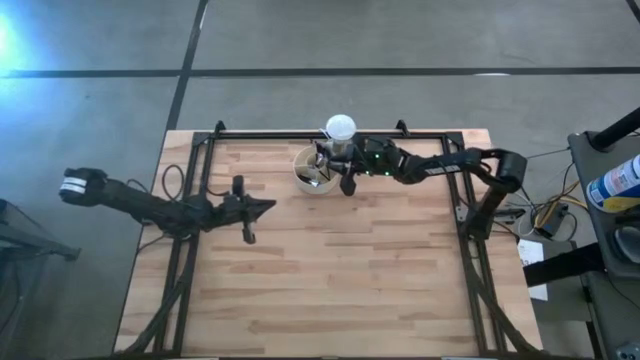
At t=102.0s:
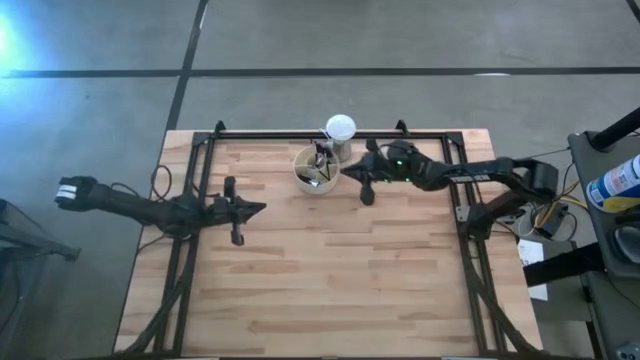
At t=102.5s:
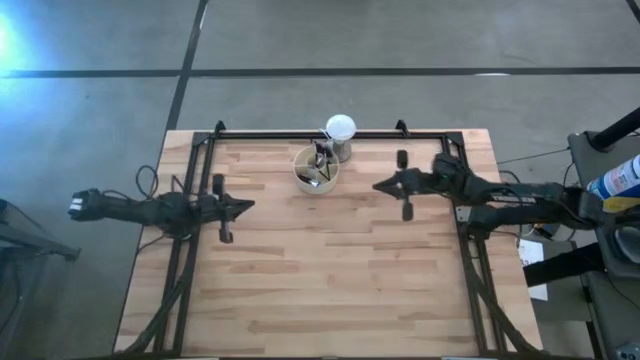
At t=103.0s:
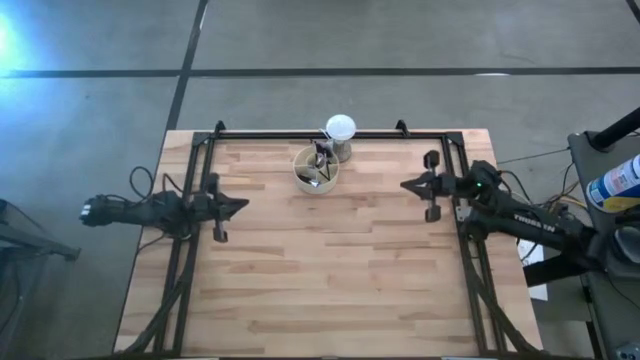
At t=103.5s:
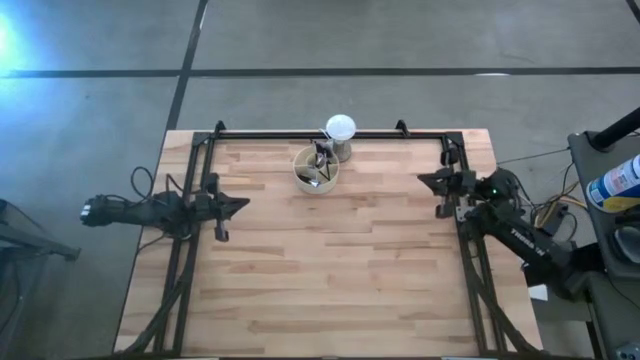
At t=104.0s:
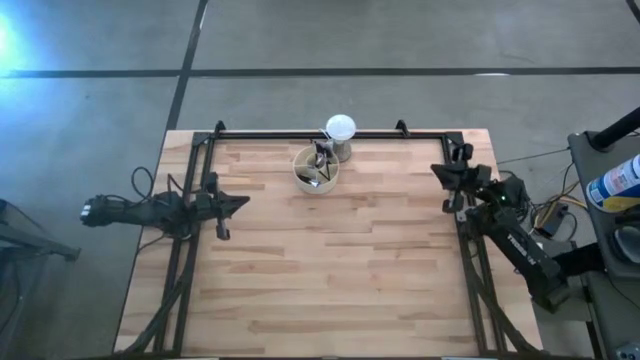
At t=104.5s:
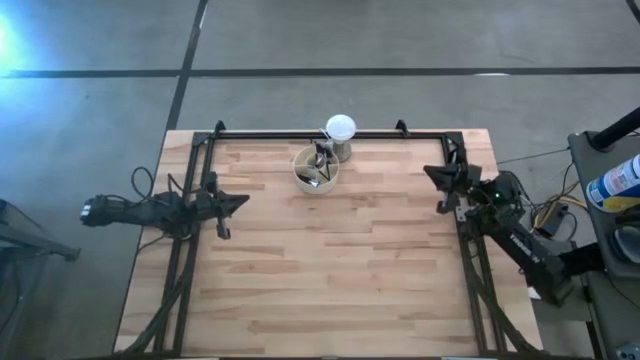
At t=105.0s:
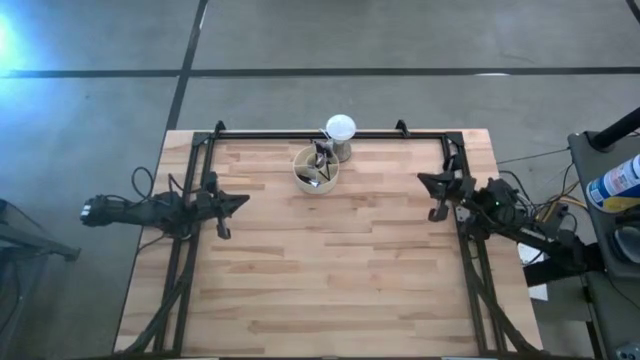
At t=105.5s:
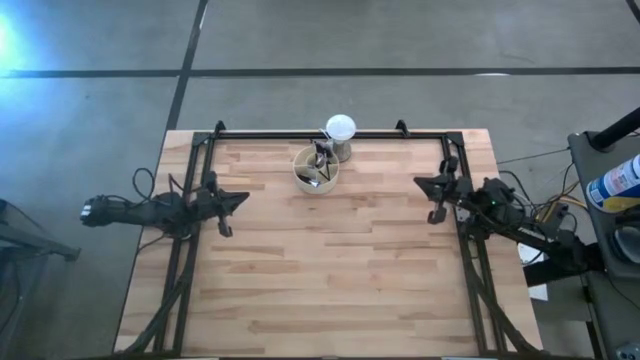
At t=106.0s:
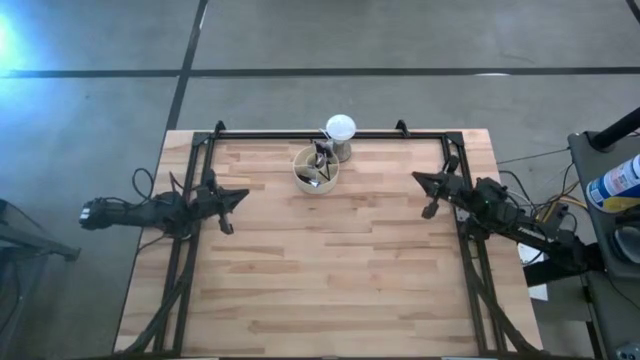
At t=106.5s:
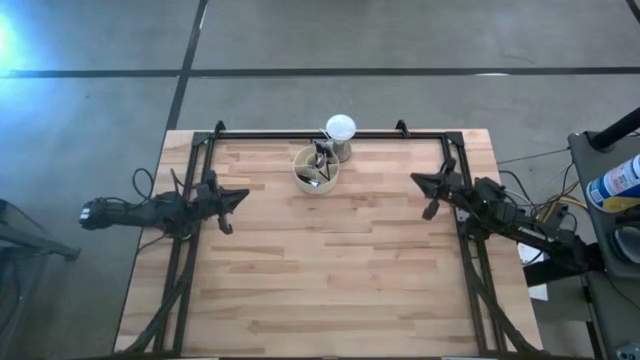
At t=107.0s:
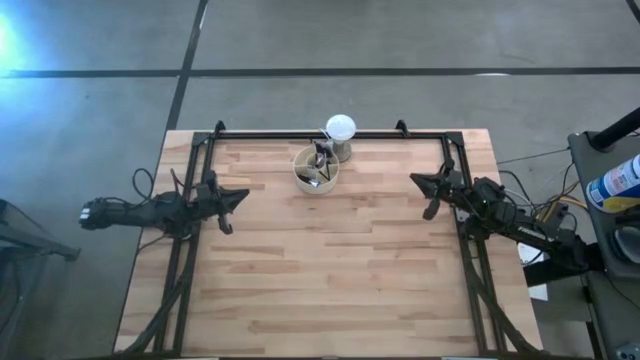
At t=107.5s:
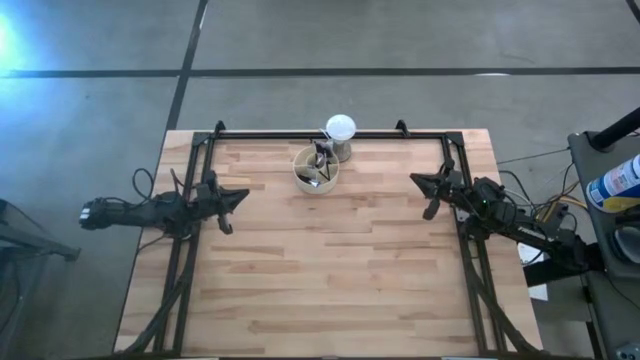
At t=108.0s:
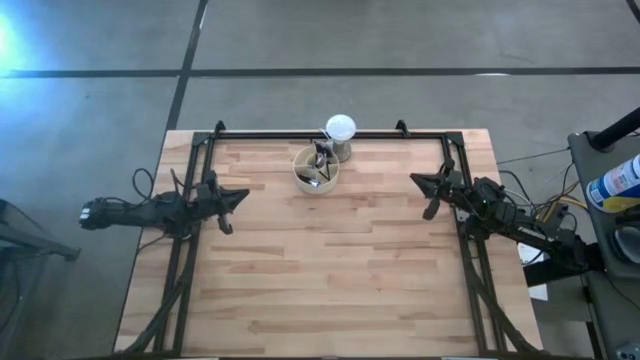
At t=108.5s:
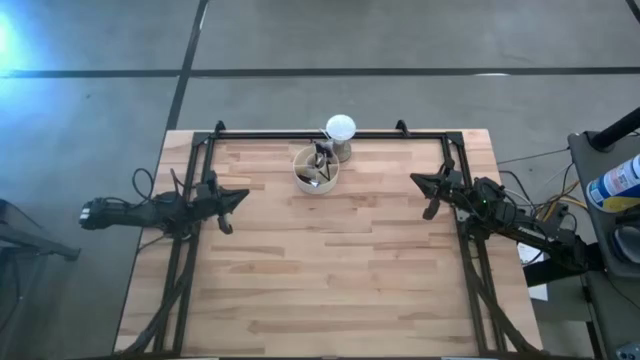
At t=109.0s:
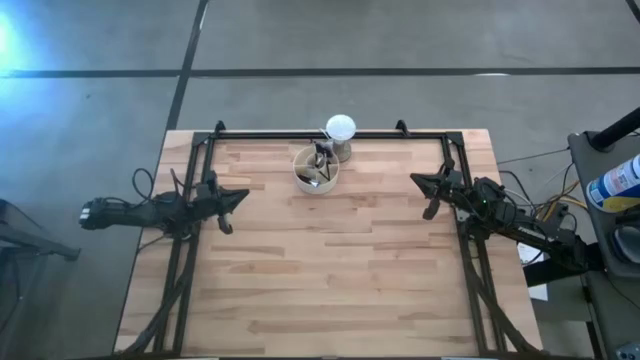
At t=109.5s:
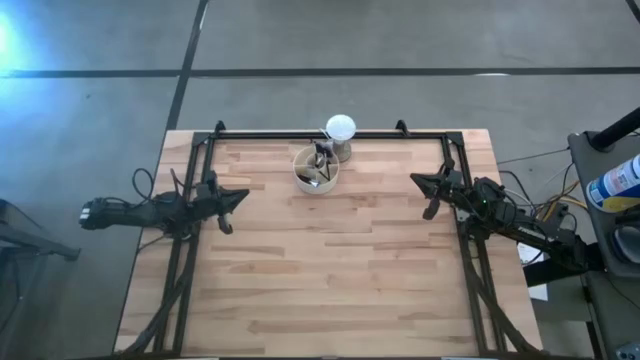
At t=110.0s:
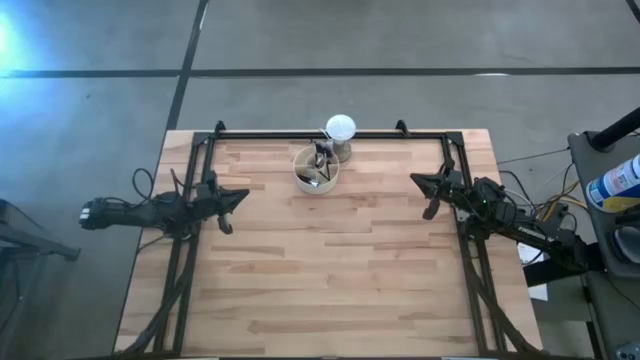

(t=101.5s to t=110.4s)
Task: Put items in baskets/containers
Return to Home Position

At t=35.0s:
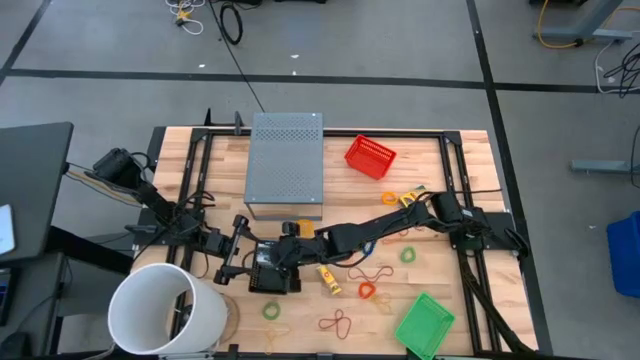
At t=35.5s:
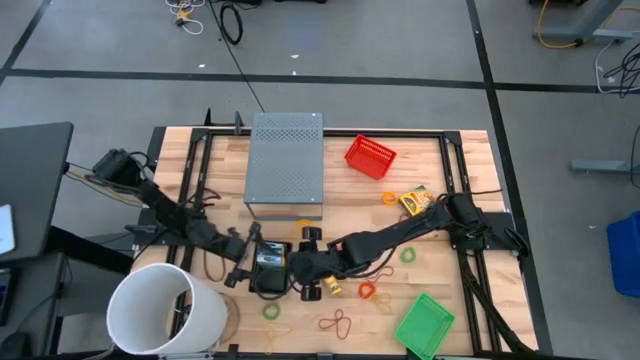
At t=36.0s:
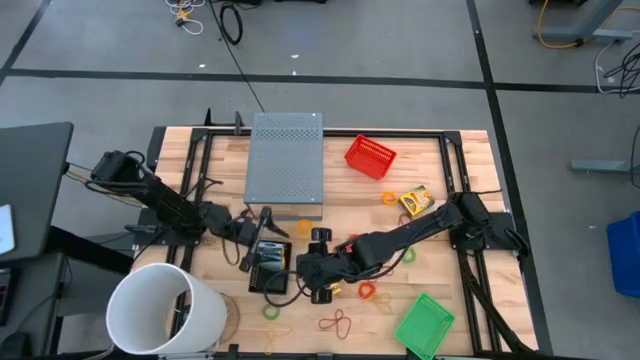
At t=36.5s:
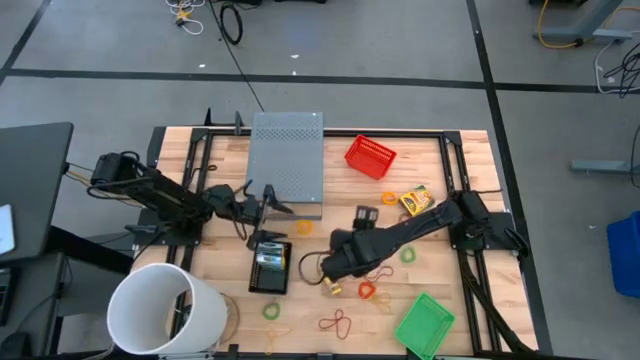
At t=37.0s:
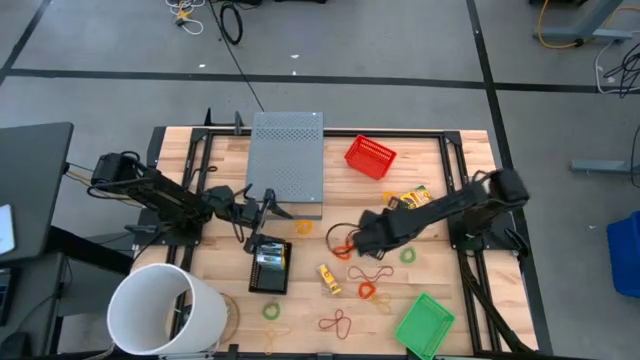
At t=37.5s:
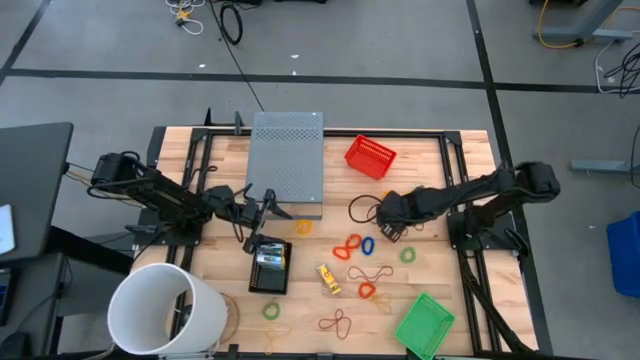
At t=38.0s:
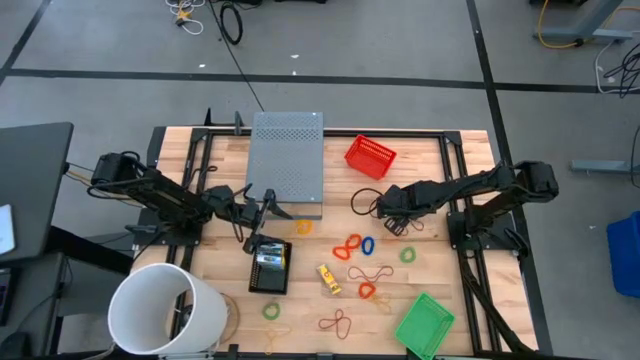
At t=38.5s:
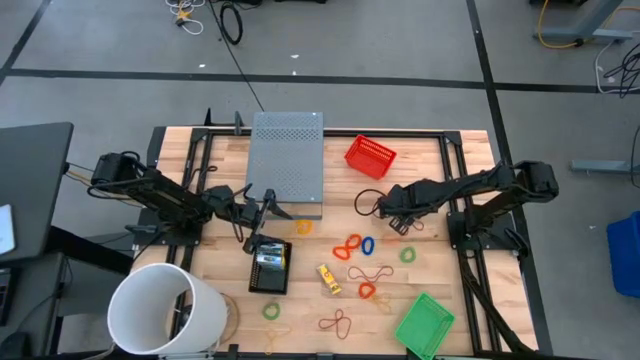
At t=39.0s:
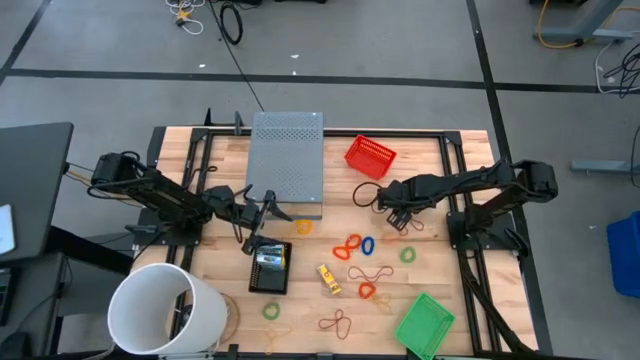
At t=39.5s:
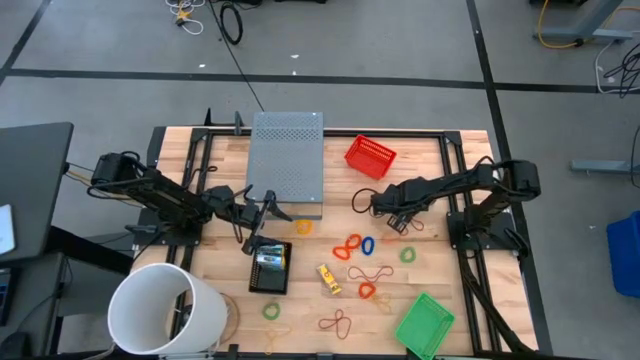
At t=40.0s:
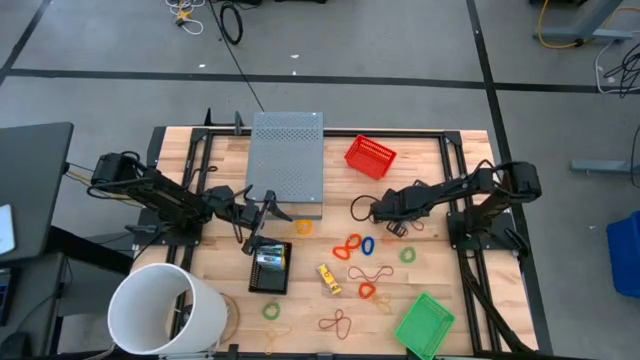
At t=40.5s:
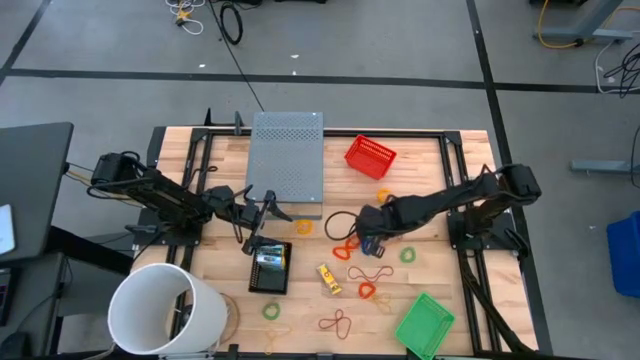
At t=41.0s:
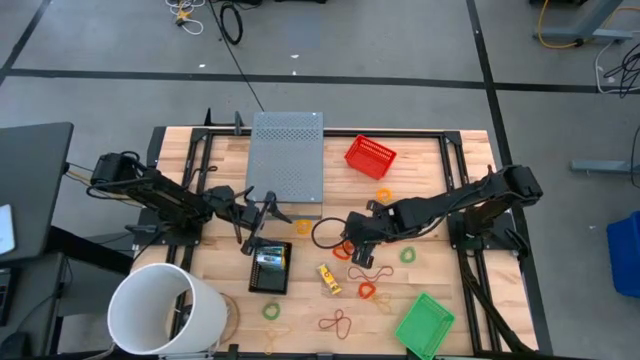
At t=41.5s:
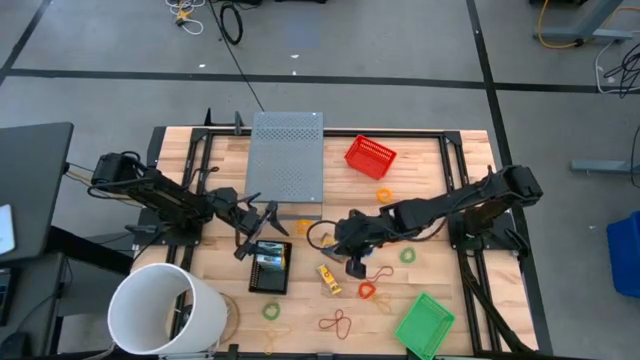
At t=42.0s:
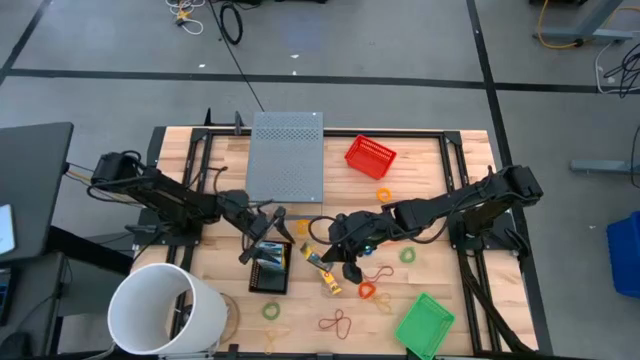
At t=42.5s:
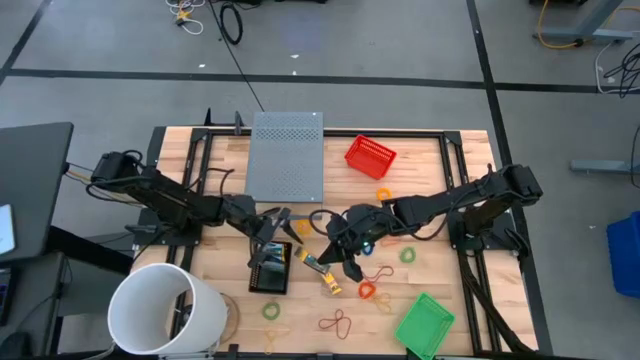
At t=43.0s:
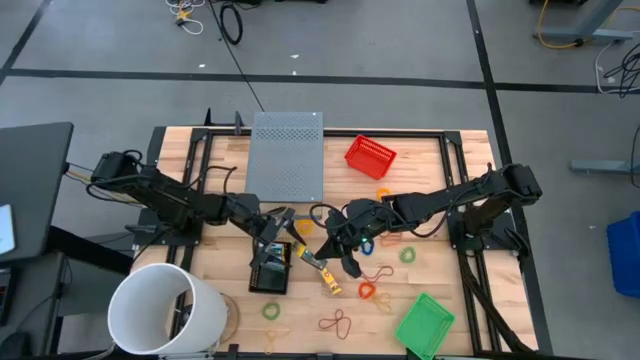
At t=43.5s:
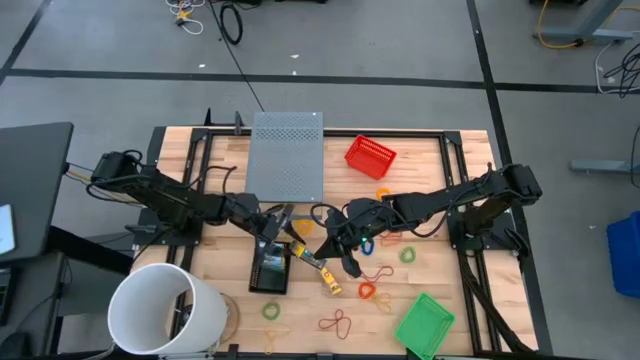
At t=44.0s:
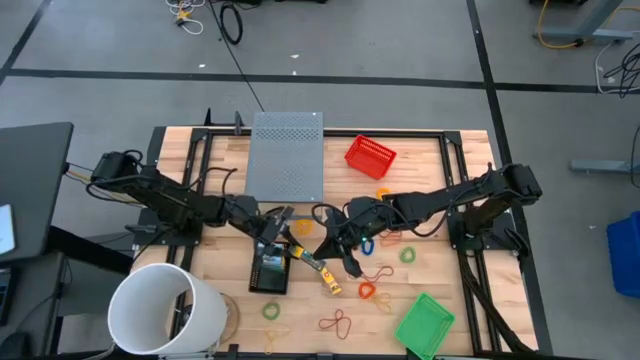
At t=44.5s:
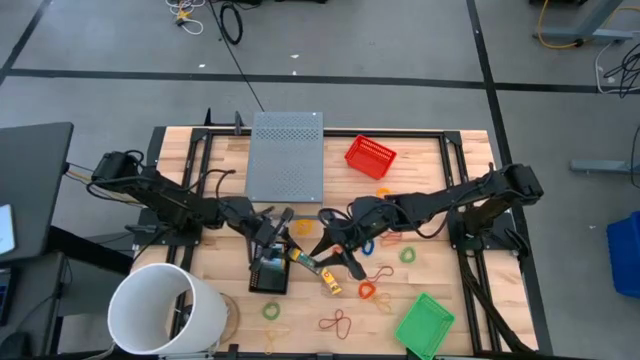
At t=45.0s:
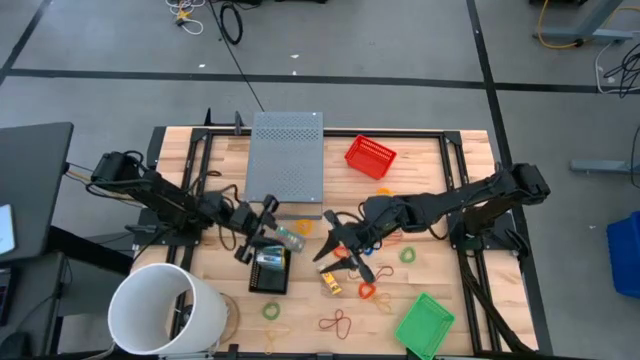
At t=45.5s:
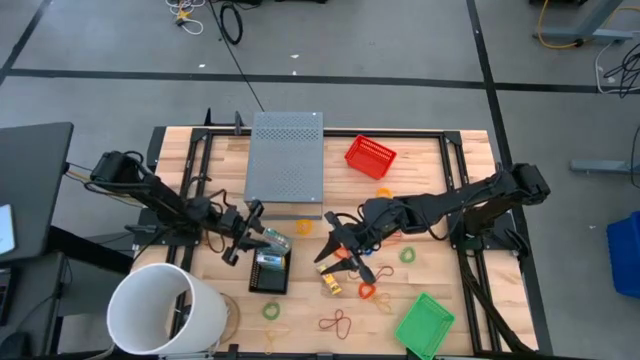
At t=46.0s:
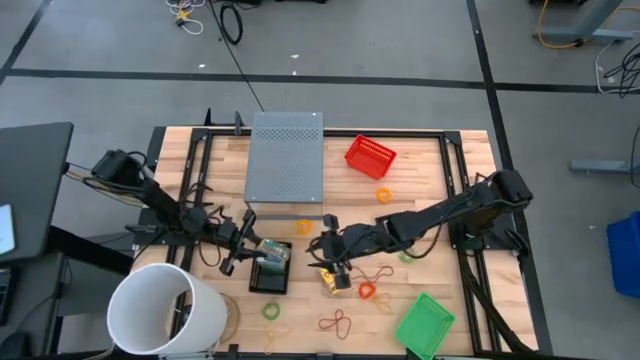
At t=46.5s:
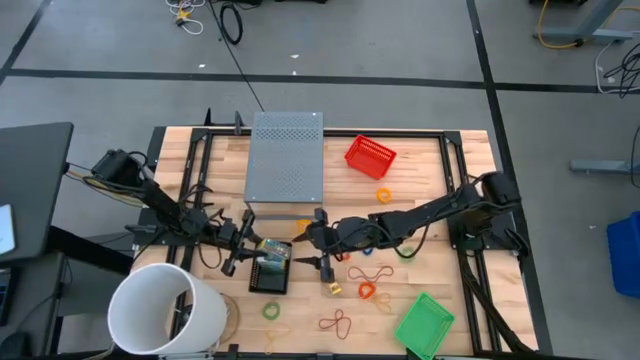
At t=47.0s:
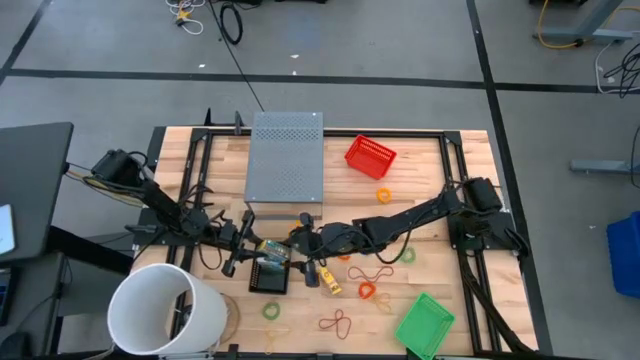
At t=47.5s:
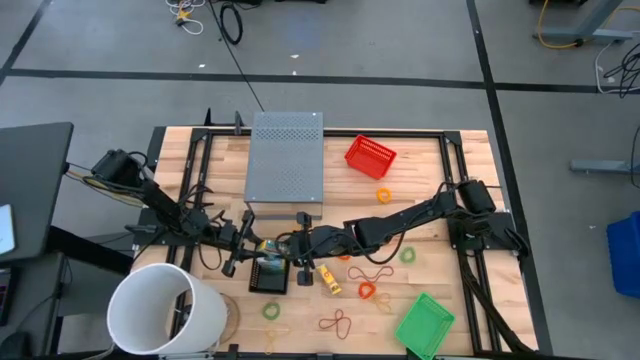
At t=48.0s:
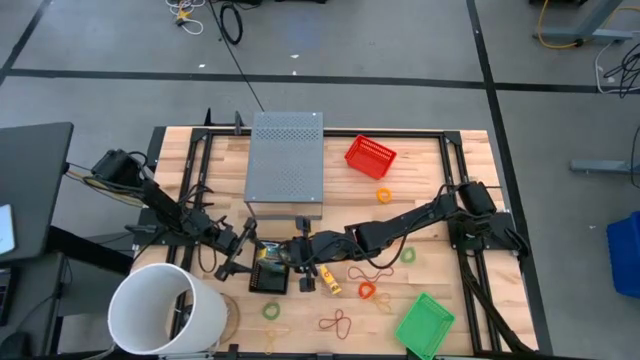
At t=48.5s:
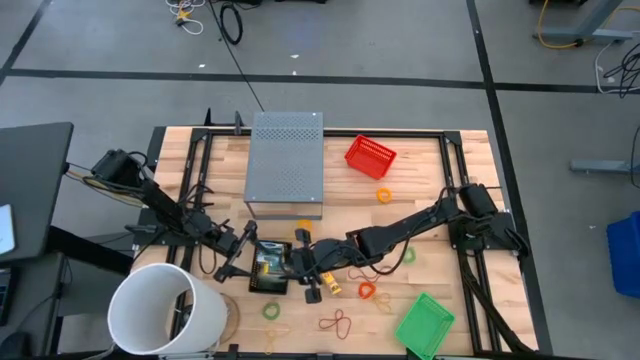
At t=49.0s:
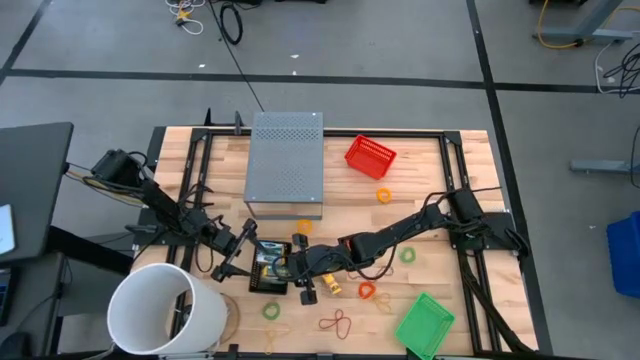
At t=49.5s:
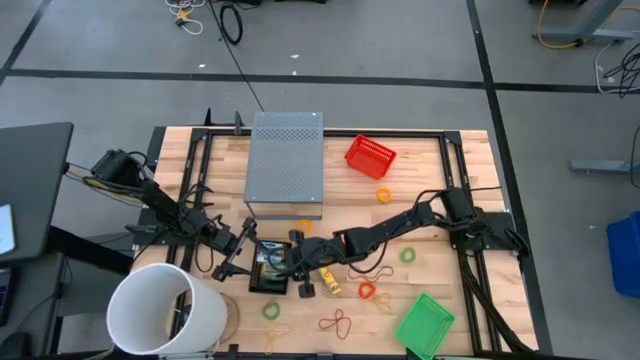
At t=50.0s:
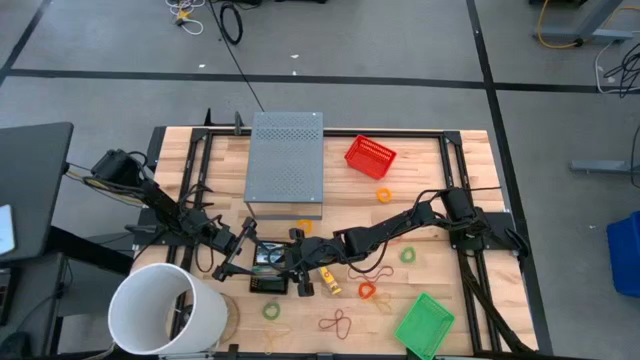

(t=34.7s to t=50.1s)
Task: Pick & Place Office Desk Supplies
Put the top crayon box into the black basket
